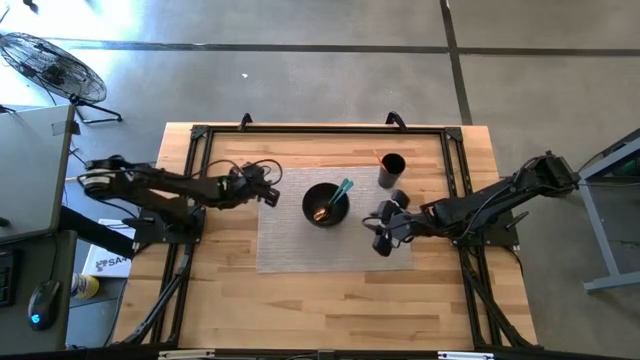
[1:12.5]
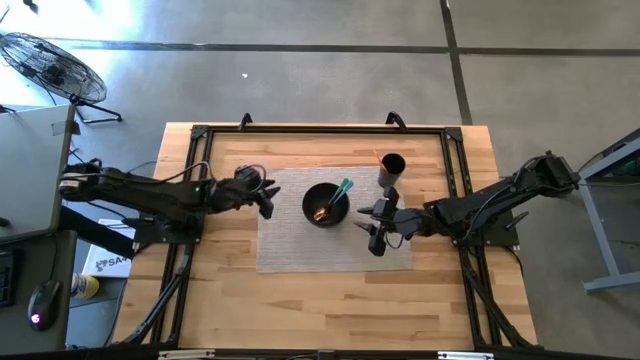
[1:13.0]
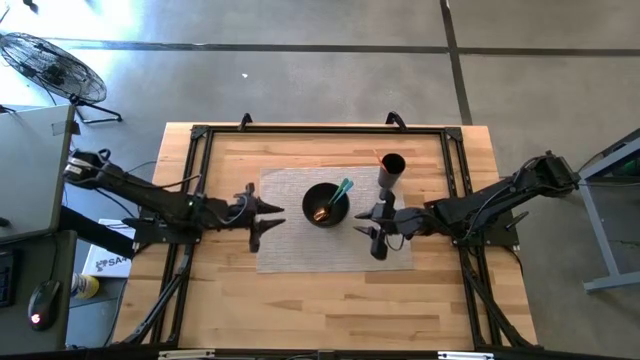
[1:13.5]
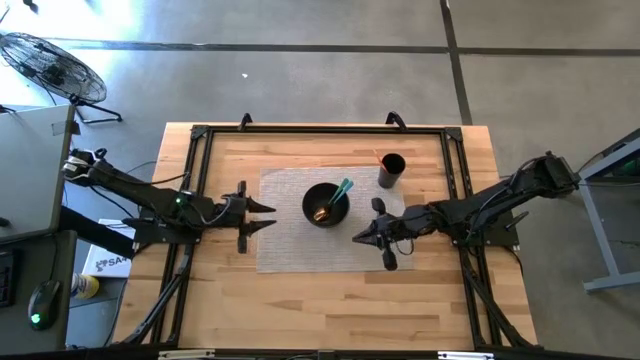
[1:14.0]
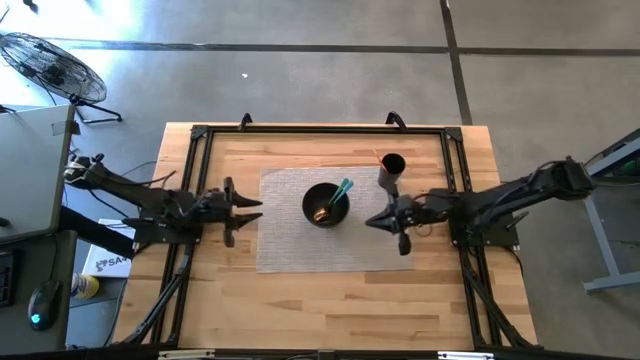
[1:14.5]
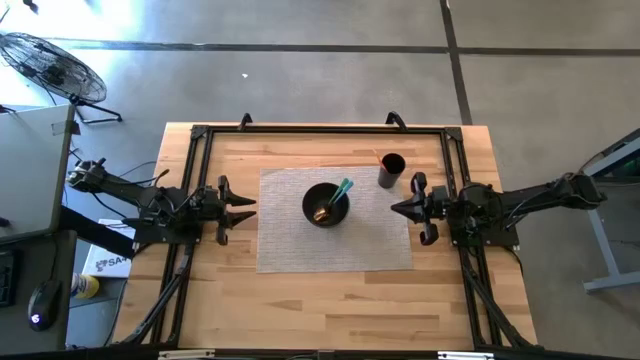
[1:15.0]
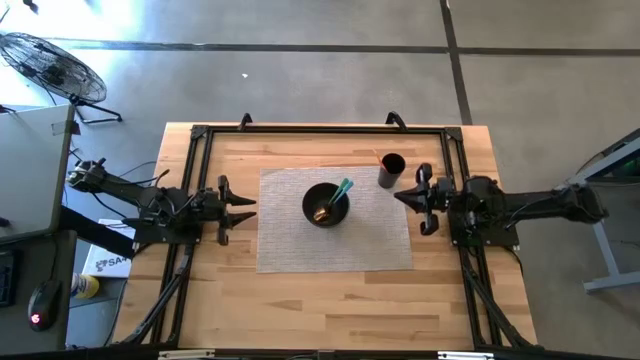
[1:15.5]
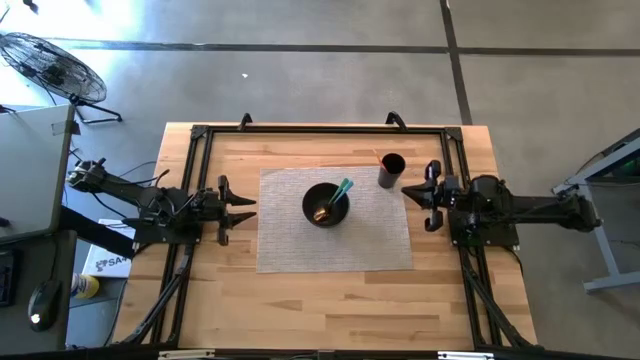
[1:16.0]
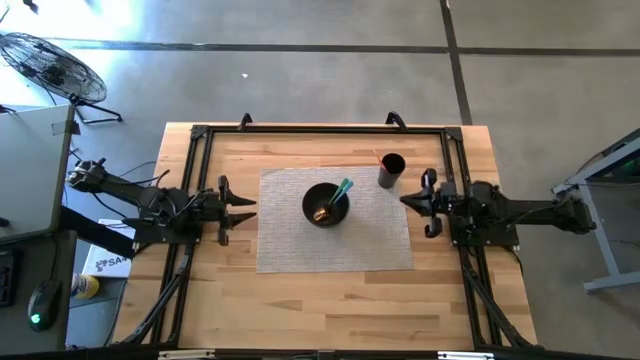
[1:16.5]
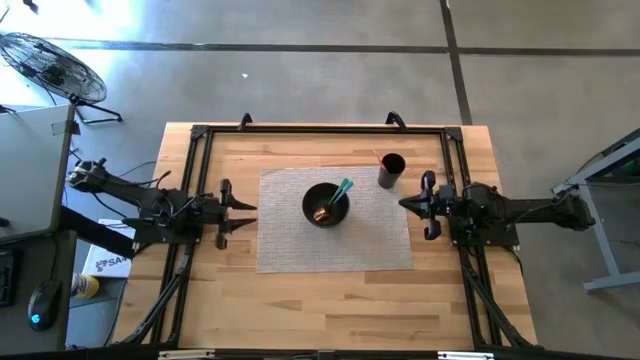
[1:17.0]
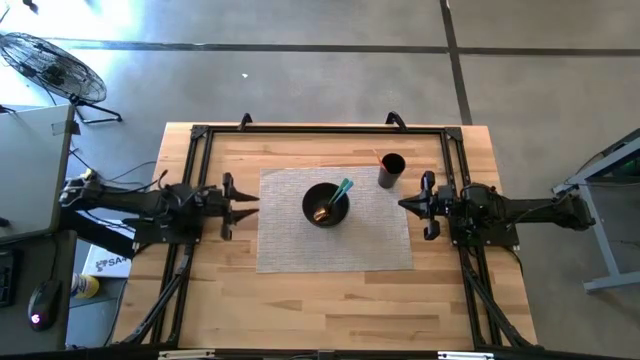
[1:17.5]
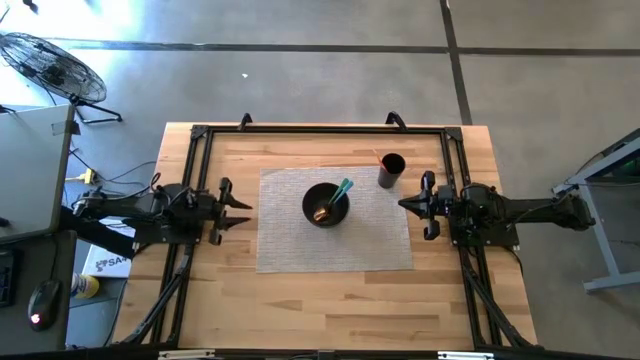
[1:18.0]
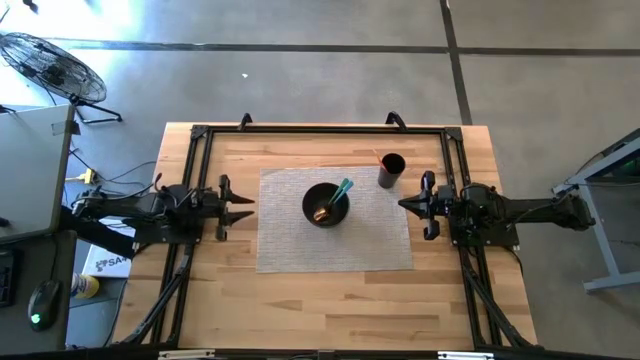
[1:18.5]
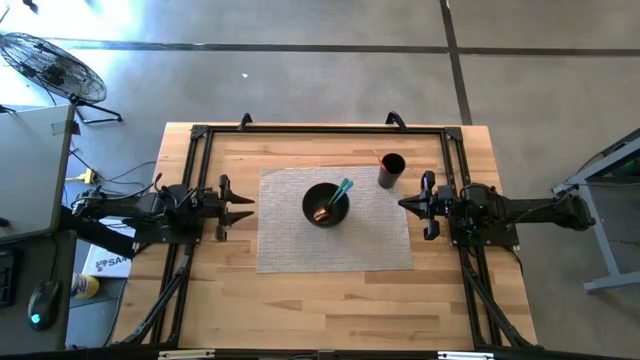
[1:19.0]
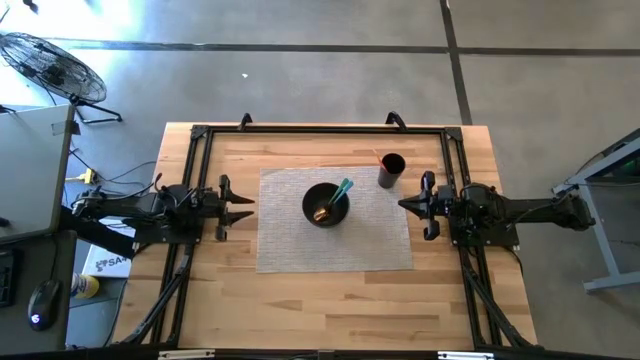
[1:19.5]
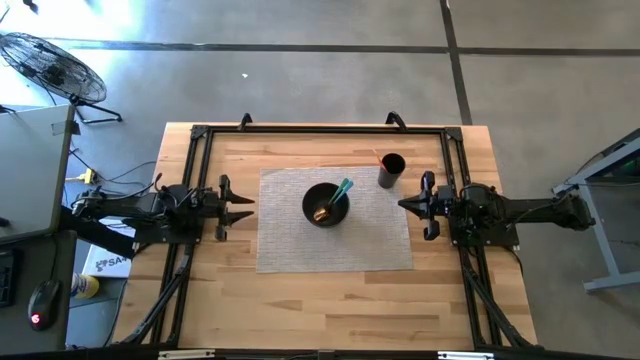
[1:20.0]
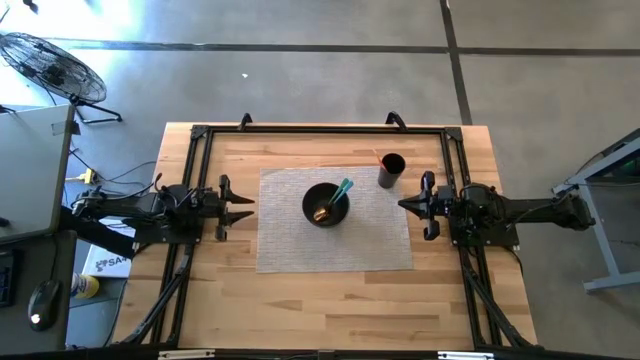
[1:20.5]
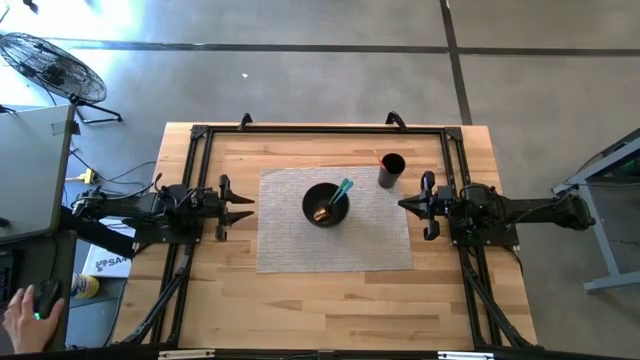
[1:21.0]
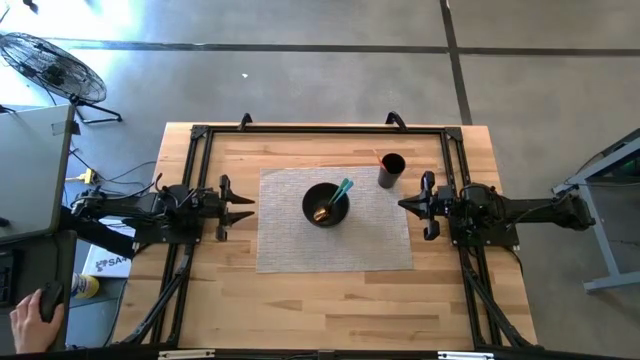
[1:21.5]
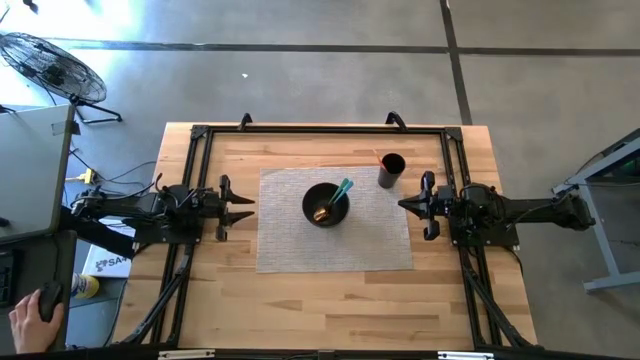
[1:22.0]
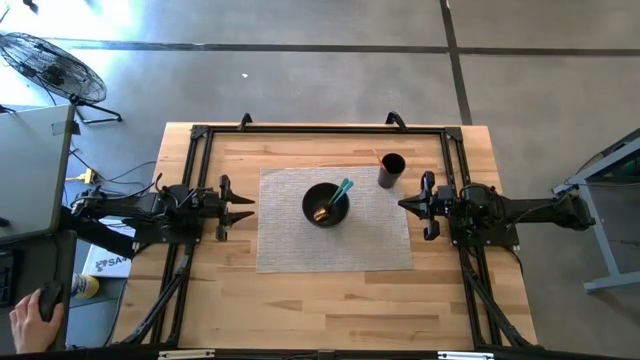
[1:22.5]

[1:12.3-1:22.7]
Task: Pick & Place Utensil
Return to Home Position

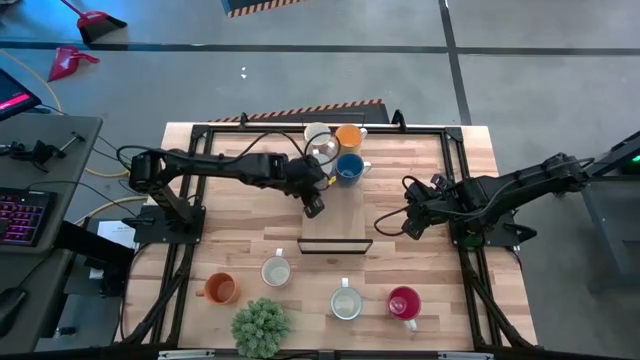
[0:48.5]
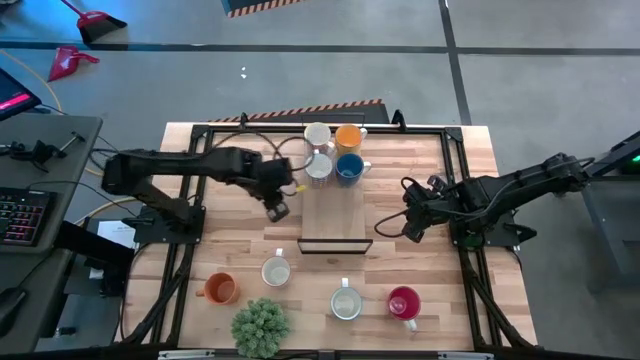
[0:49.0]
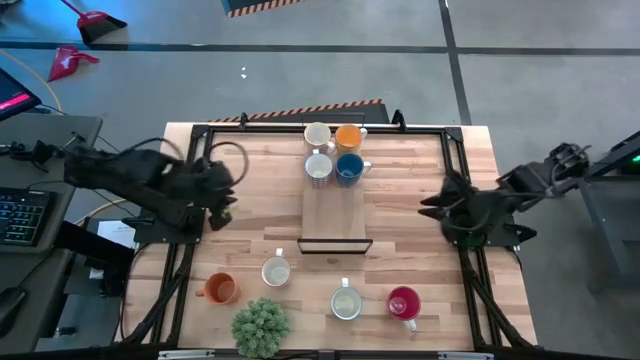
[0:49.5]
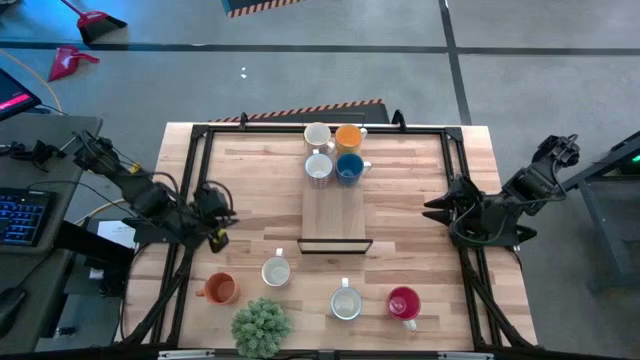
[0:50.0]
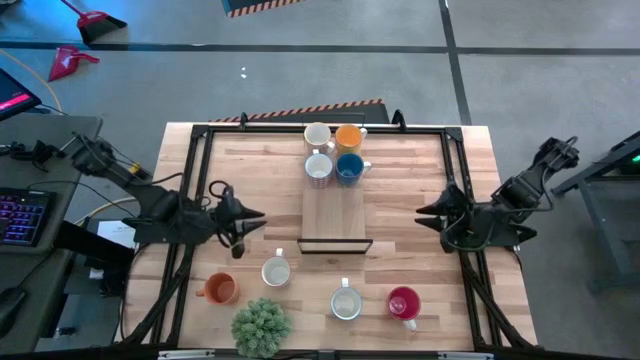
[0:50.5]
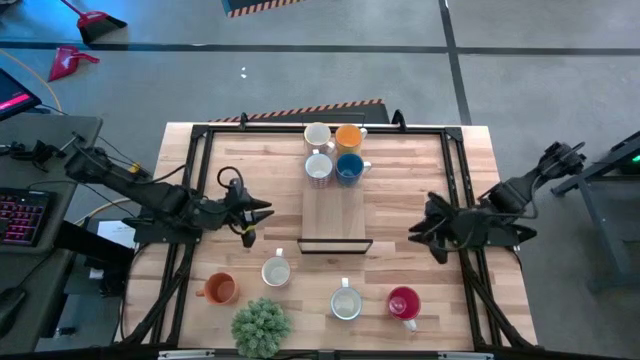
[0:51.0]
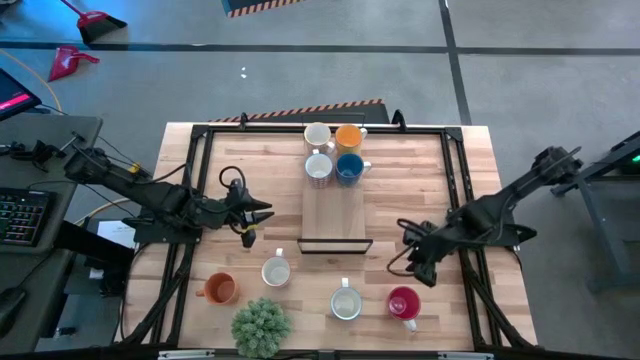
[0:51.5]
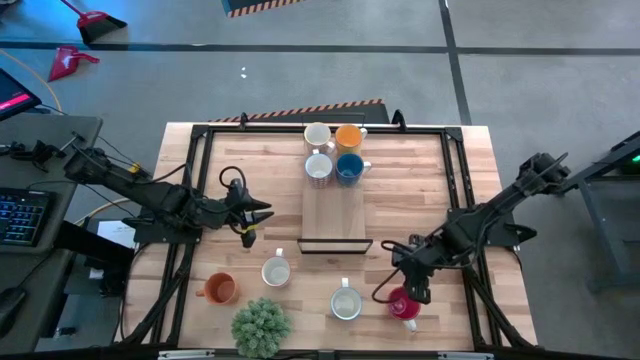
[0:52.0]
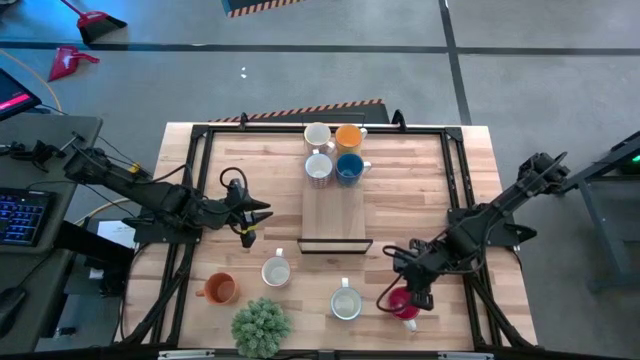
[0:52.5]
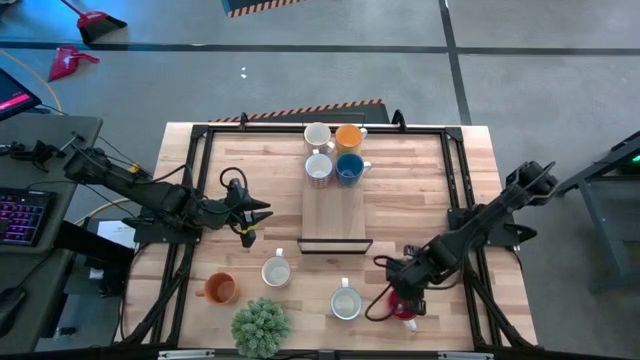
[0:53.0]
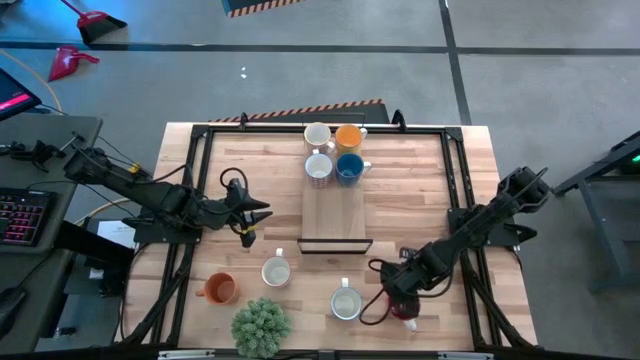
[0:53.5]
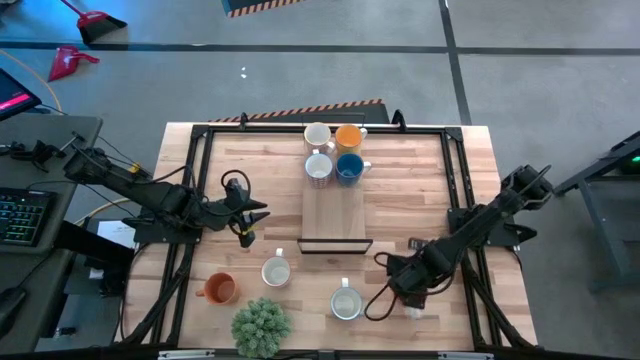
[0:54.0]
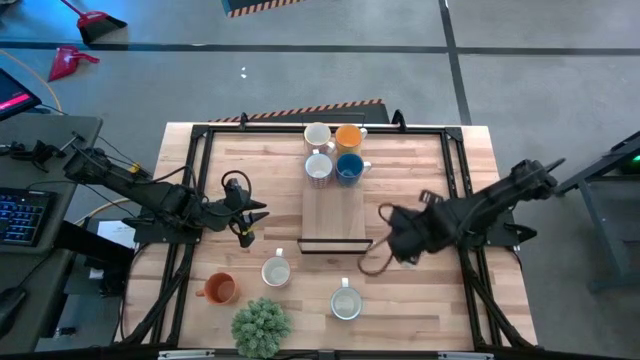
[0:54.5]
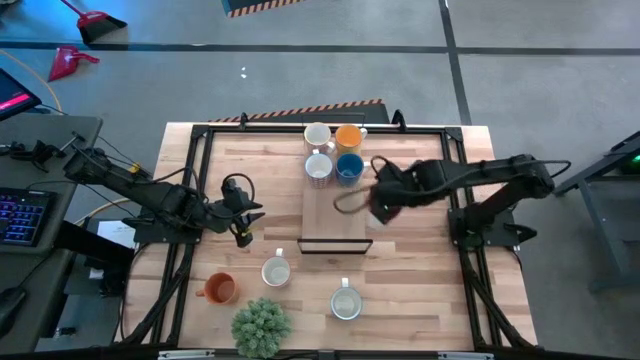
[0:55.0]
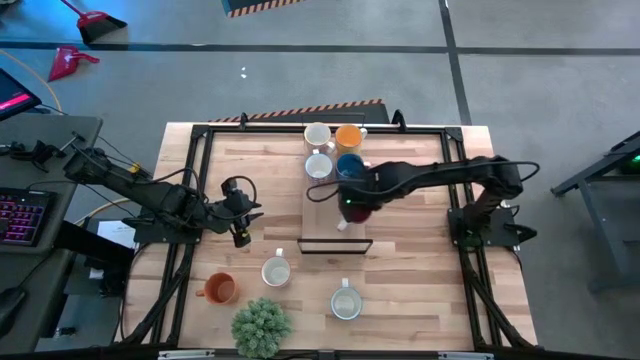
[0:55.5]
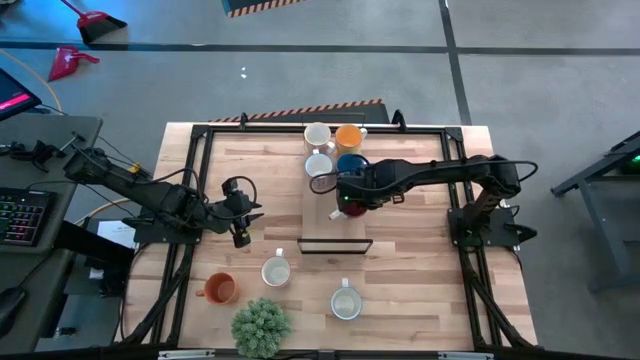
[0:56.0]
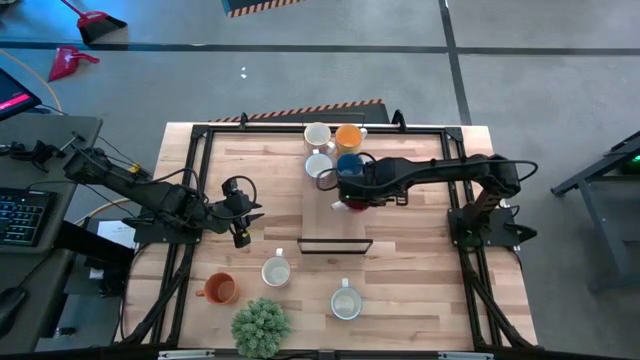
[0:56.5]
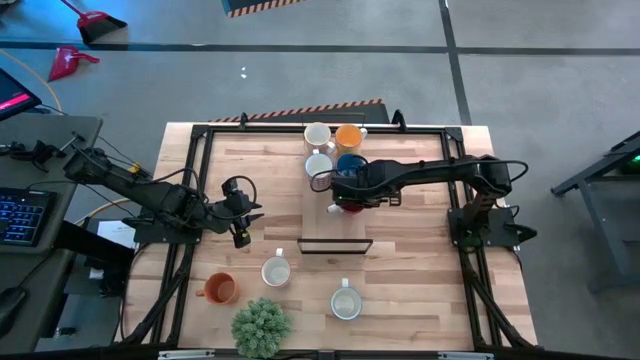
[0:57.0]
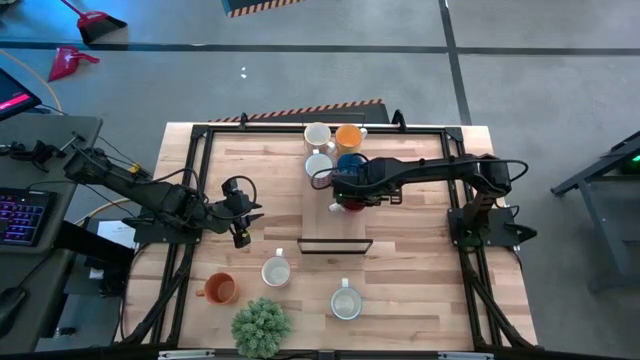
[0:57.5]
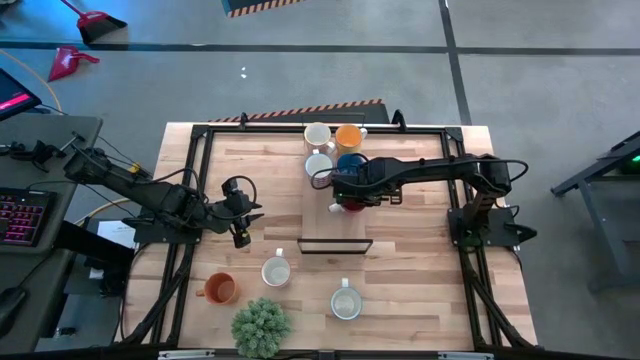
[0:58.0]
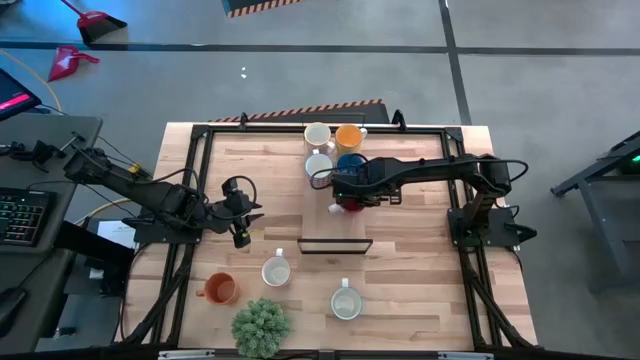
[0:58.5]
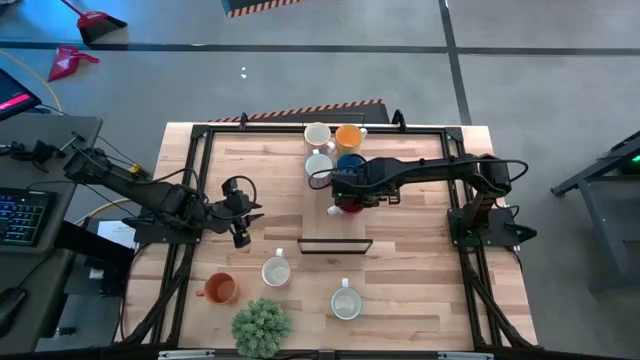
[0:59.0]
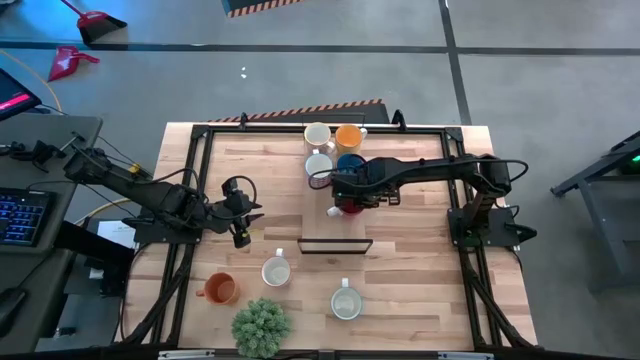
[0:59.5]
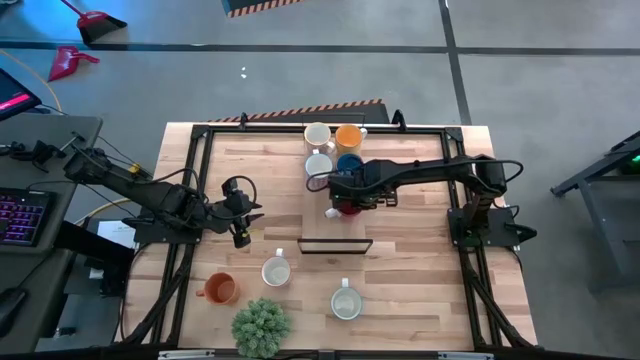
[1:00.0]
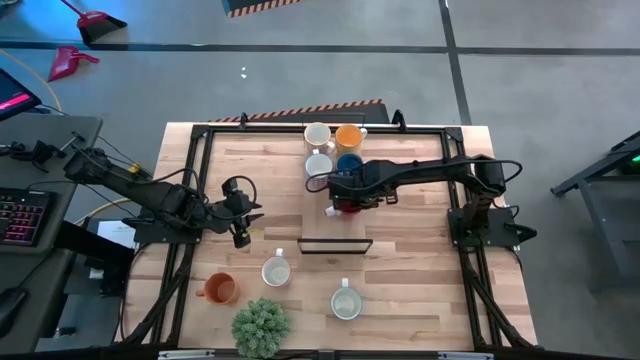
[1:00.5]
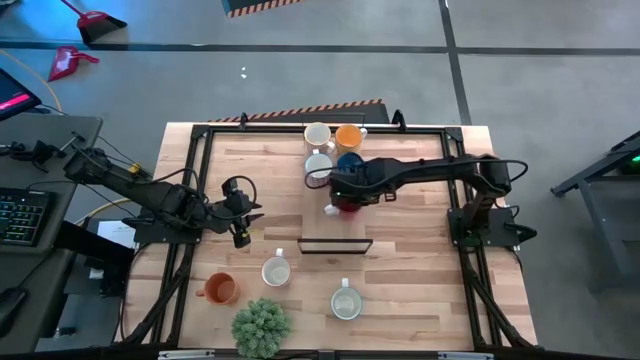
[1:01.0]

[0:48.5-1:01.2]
Task: Place coffee mugs
Put the red cup on the shelf
